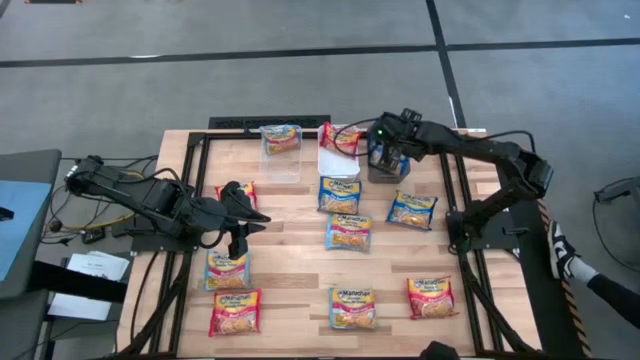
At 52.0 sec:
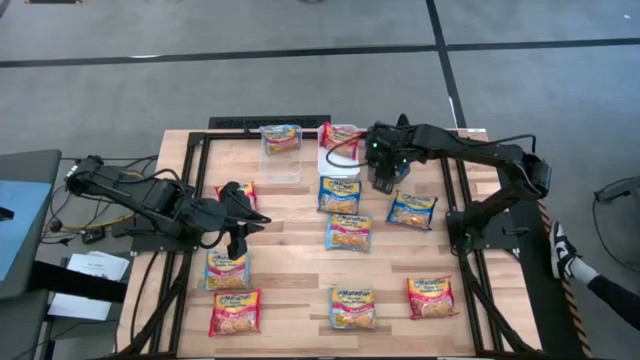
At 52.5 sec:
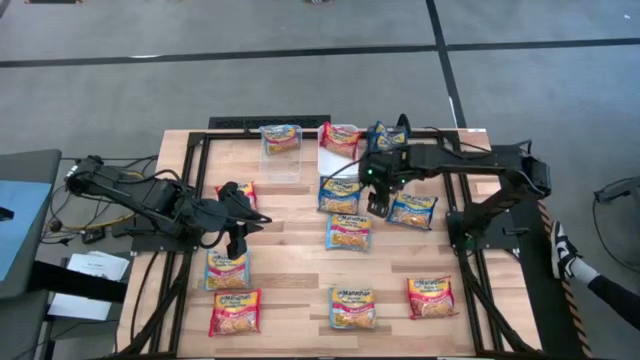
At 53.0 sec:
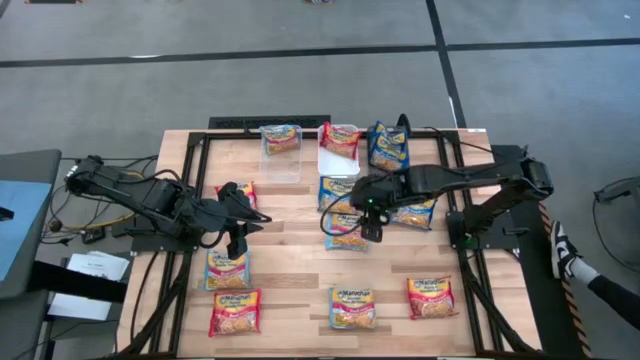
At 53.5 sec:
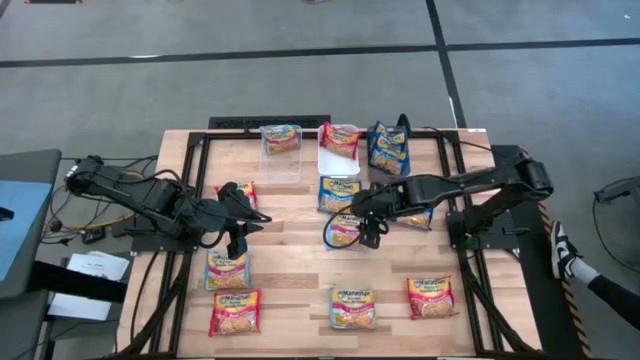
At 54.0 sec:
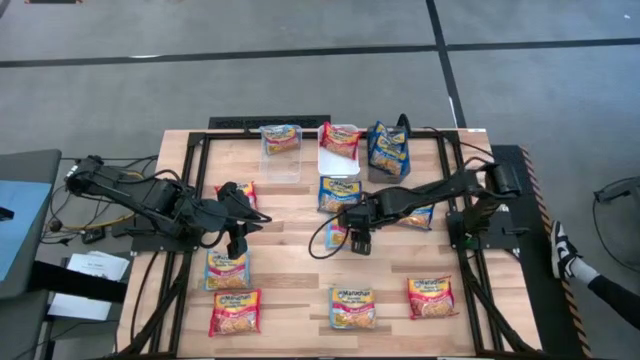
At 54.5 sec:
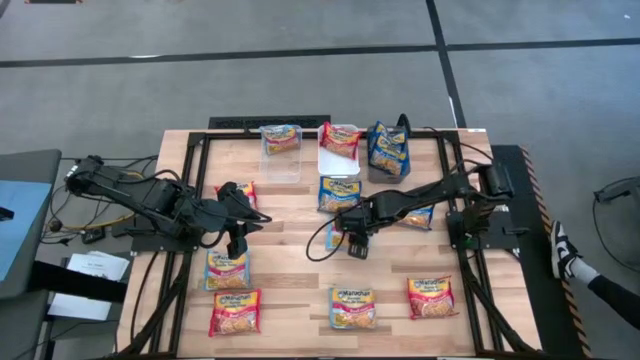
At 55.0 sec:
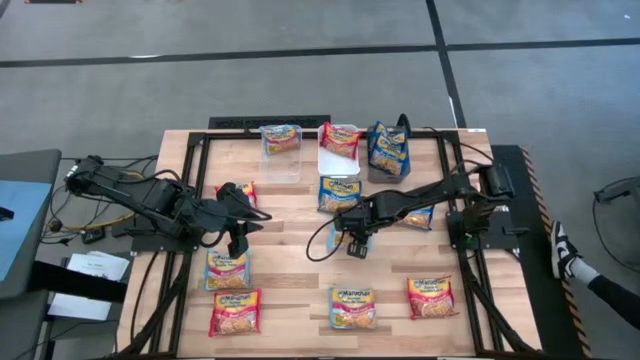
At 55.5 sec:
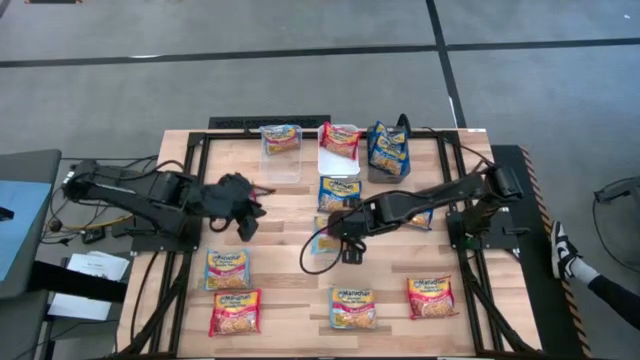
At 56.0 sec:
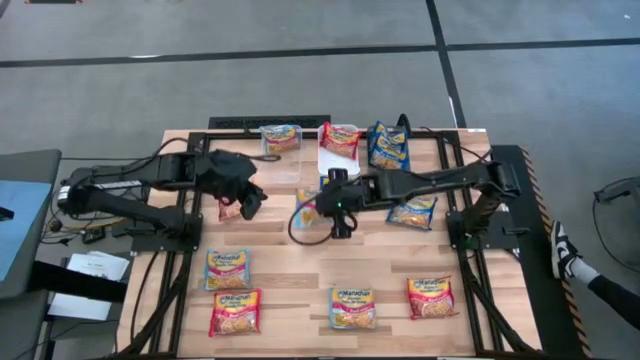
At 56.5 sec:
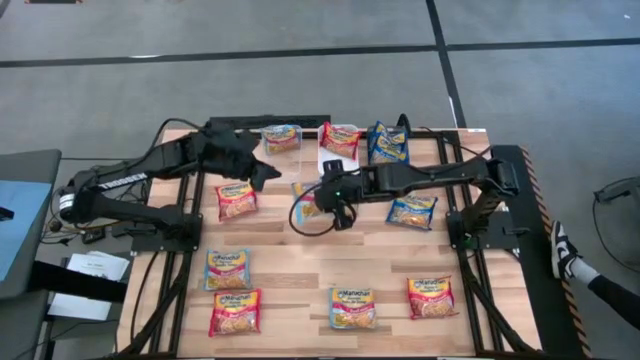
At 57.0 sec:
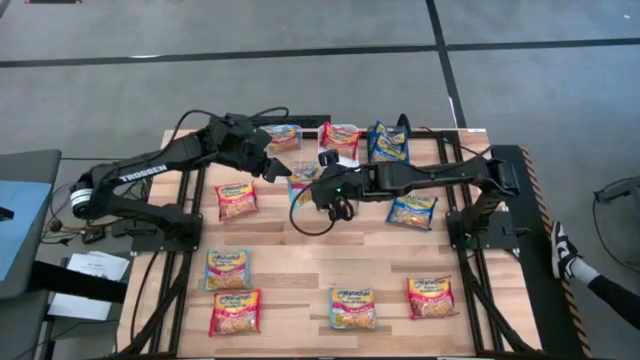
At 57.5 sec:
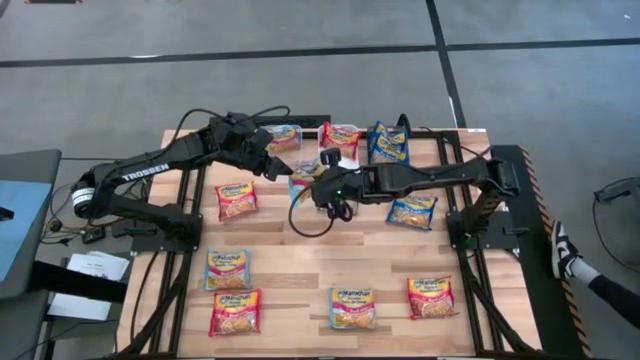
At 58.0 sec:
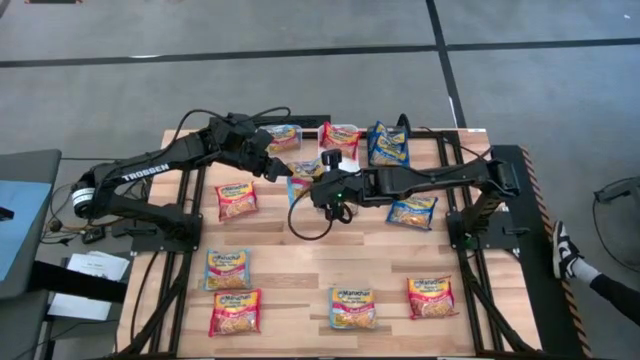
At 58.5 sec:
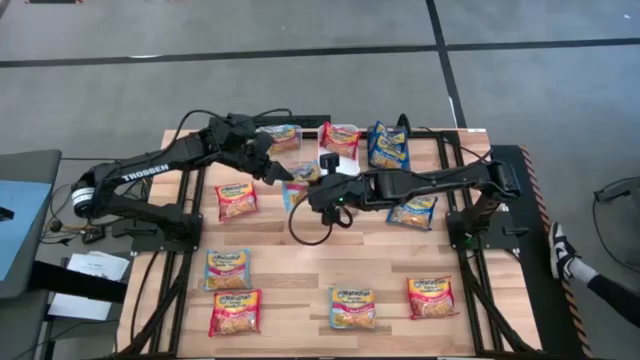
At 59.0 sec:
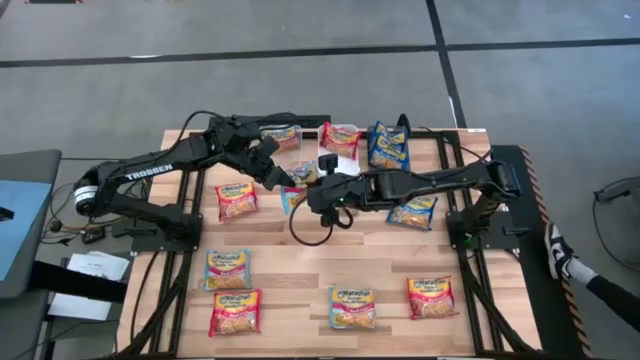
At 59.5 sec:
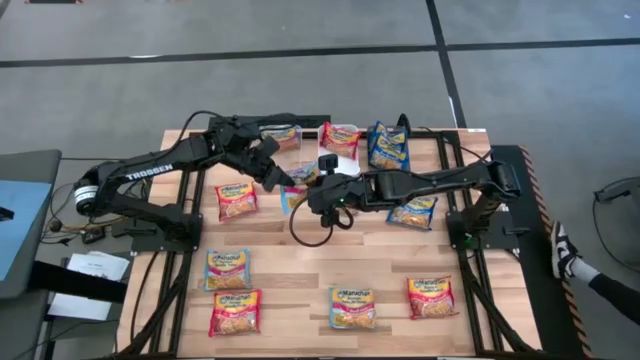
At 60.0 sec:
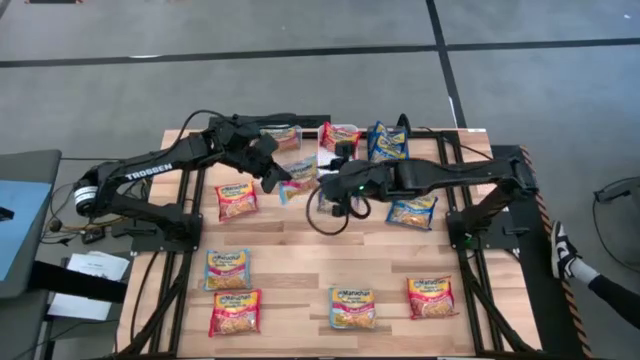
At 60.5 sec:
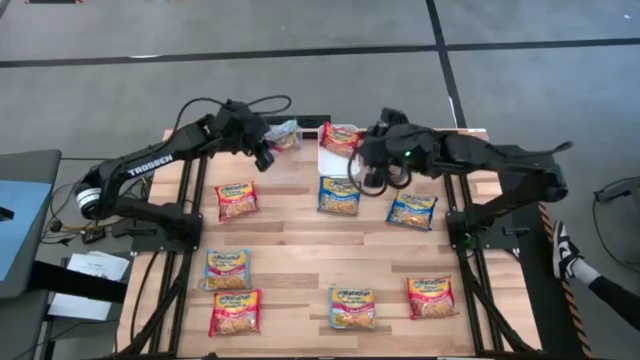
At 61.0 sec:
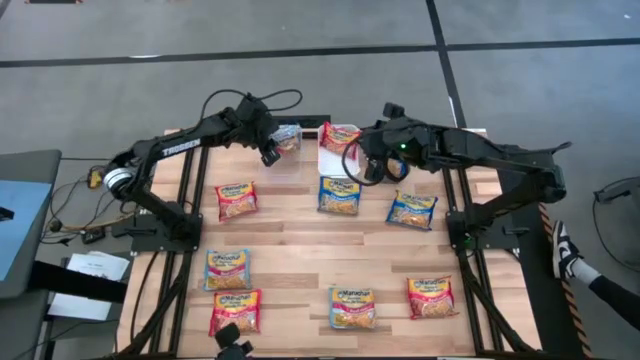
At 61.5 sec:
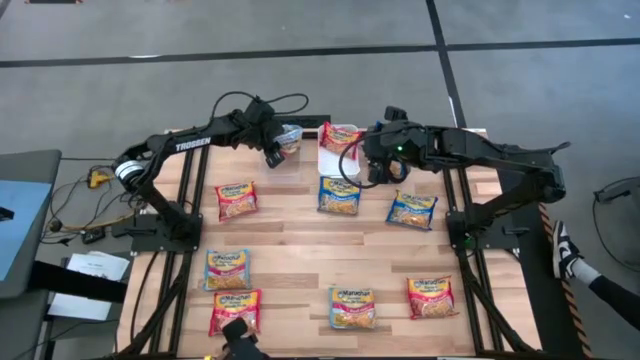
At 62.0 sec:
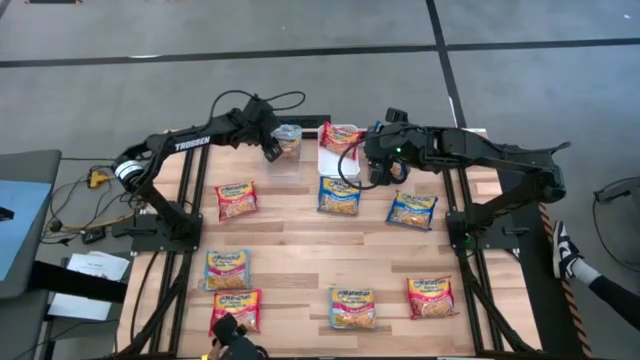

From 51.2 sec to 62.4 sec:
Task: Sort Maruchan noodles
Put the light blue noodle pack into the transparent bin

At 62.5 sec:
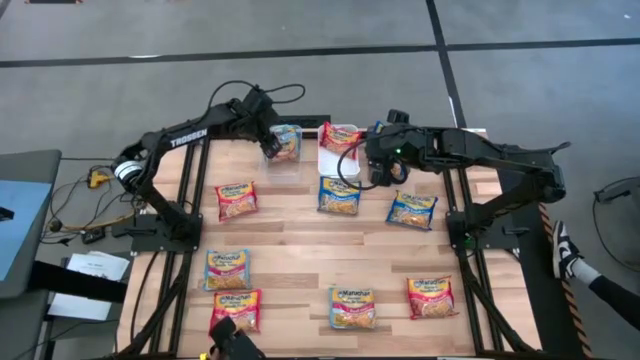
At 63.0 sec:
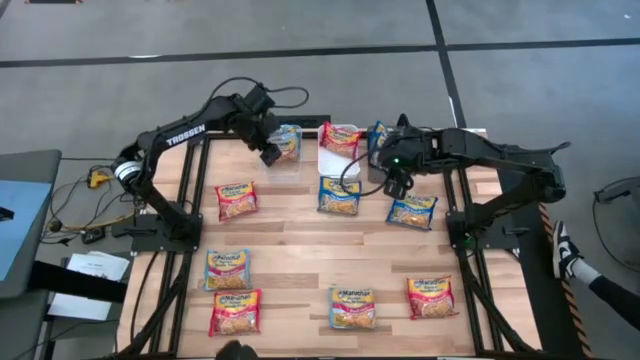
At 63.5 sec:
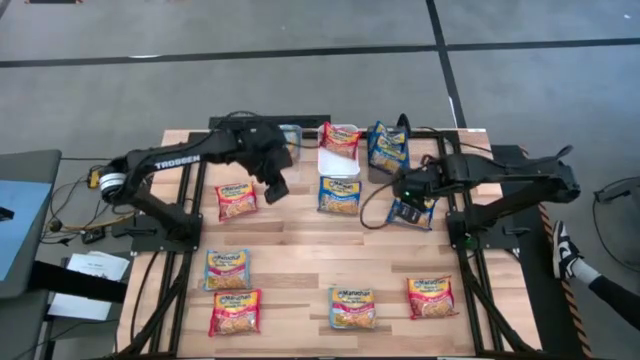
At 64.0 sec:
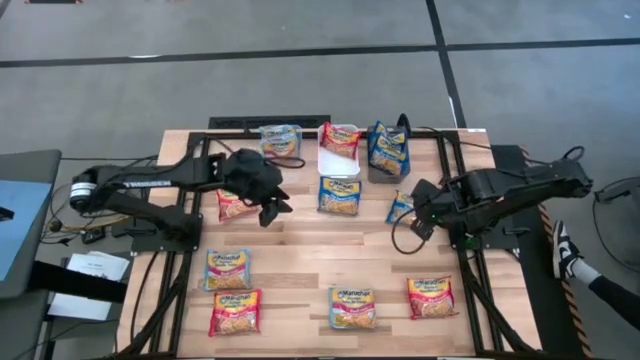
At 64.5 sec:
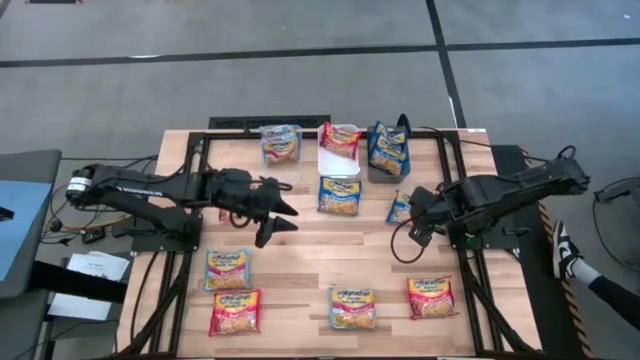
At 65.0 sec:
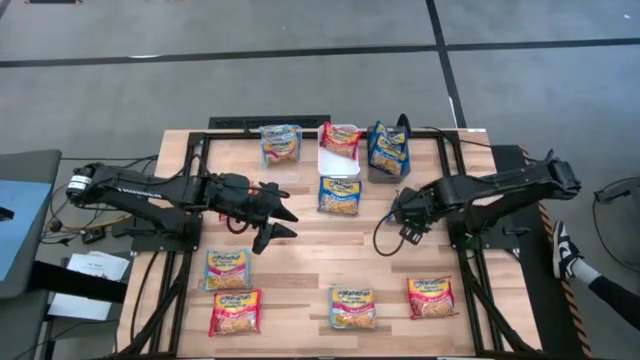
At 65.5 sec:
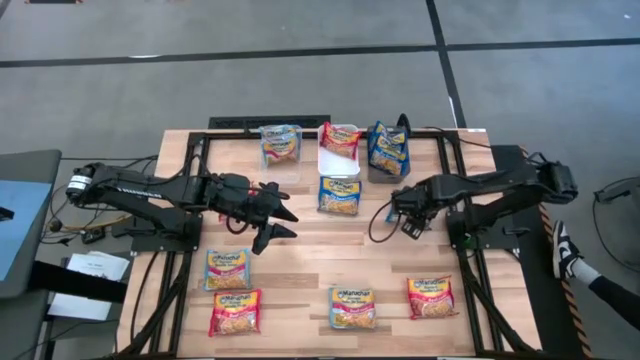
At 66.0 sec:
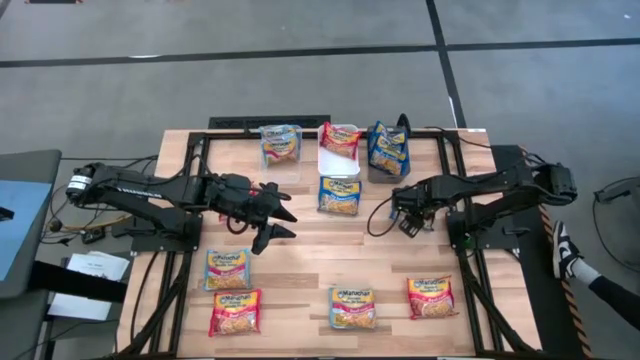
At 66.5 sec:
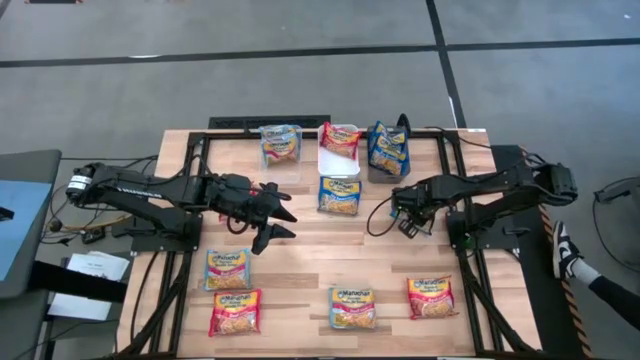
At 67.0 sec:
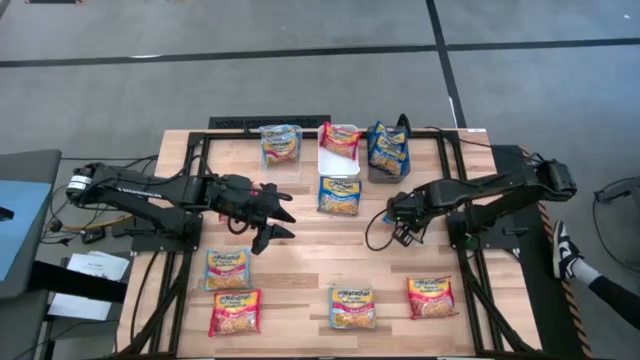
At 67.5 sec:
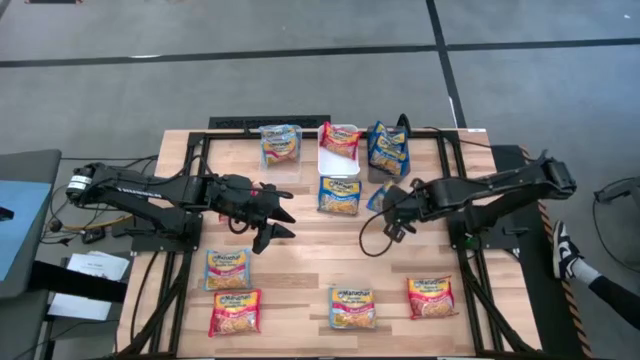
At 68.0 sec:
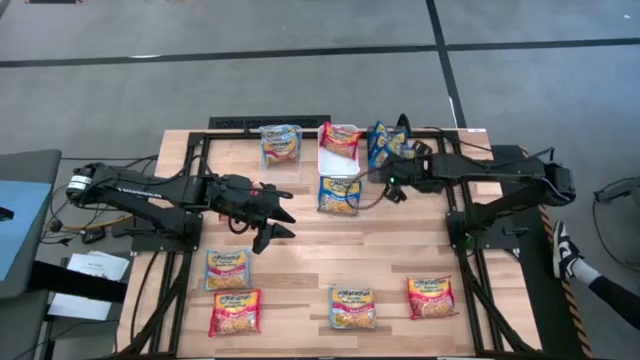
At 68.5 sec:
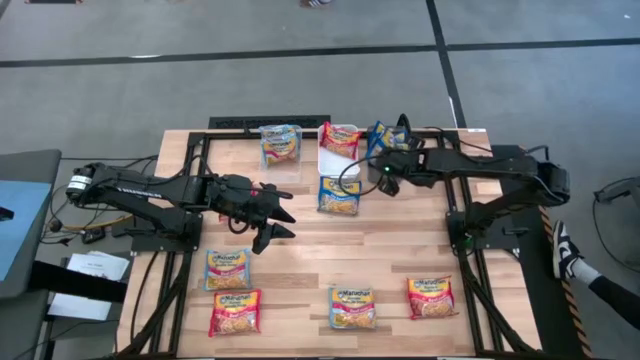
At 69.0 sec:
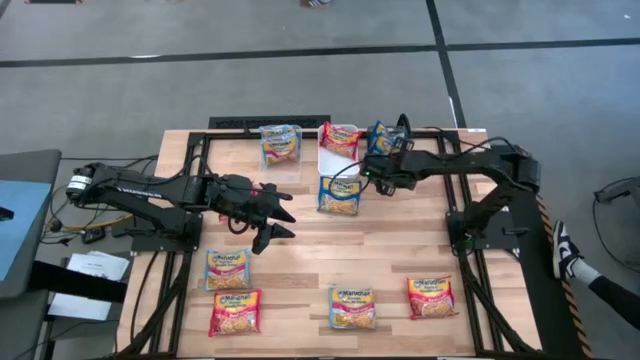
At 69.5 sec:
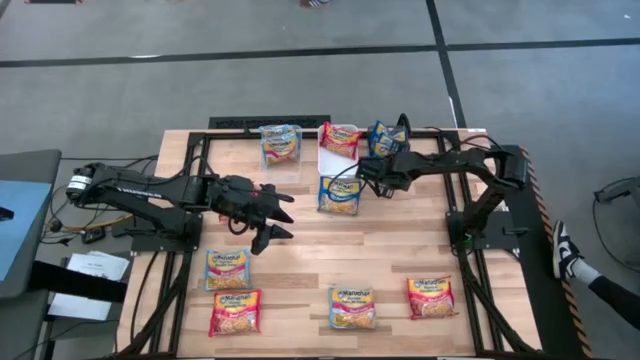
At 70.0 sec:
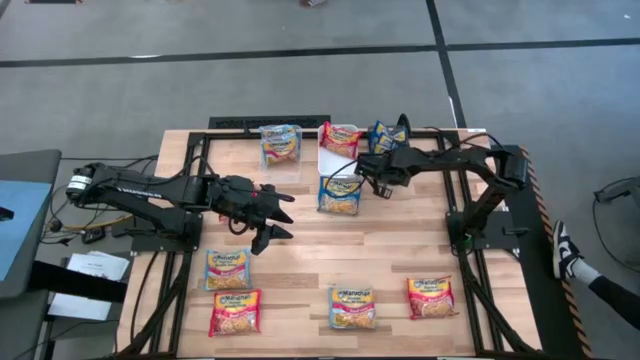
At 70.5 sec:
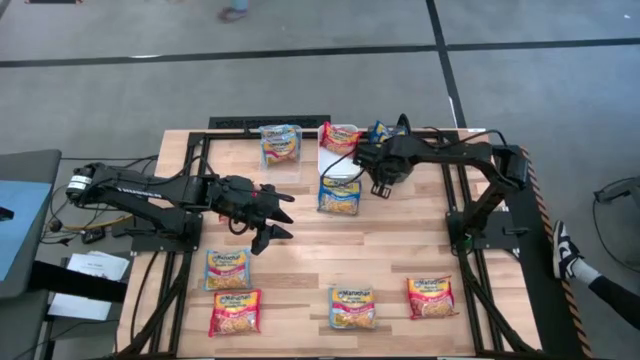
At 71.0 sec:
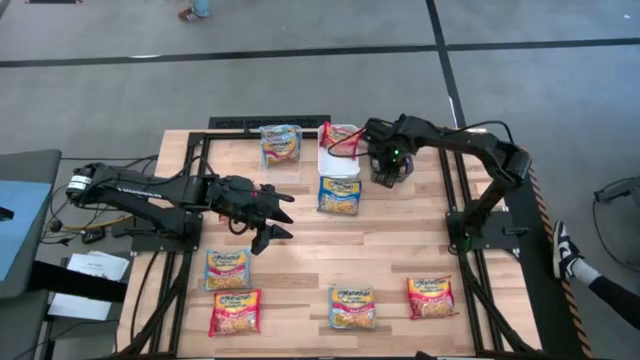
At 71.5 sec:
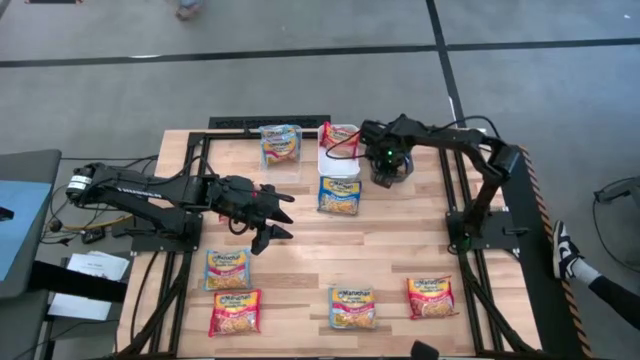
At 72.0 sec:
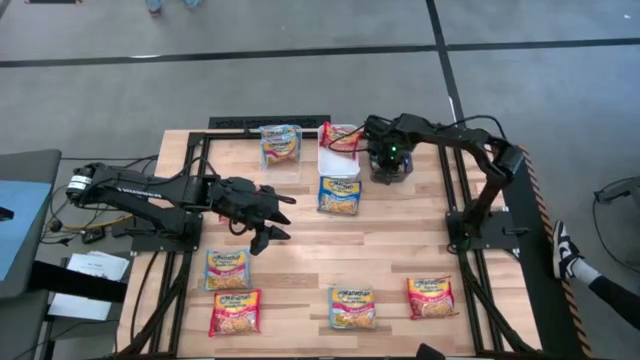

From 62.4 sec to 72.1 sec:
Put the blue noodle pack into the black bin
